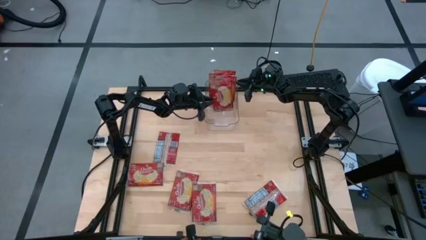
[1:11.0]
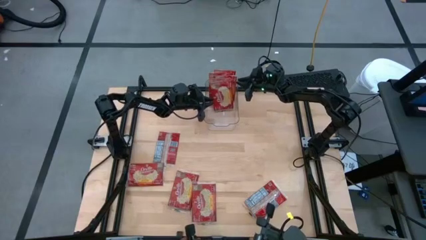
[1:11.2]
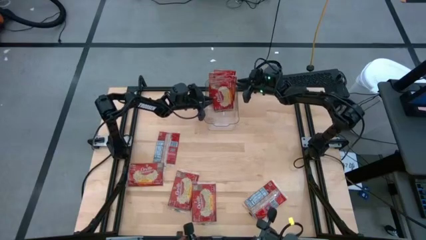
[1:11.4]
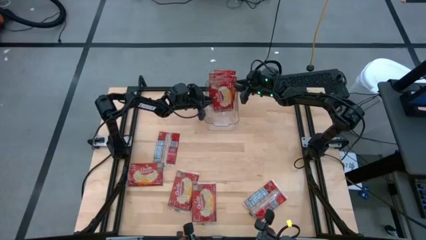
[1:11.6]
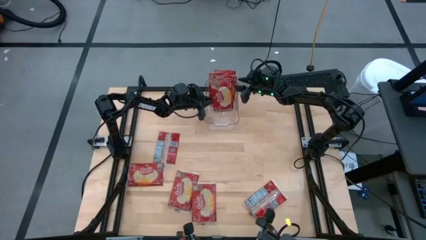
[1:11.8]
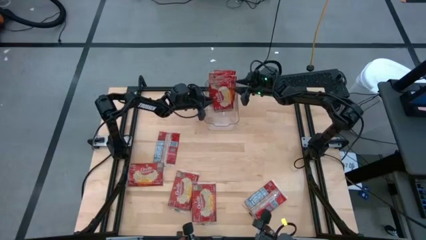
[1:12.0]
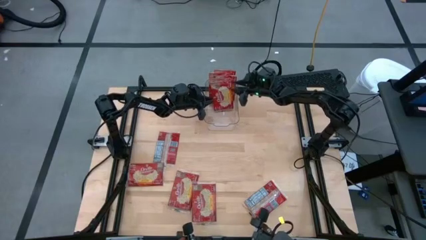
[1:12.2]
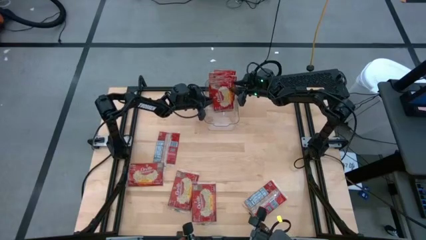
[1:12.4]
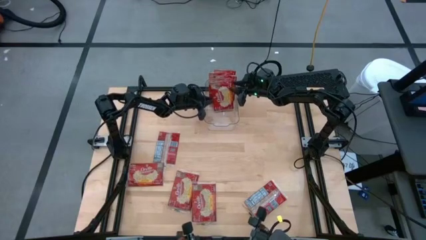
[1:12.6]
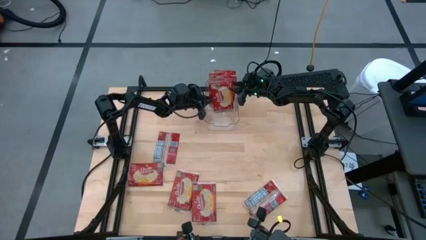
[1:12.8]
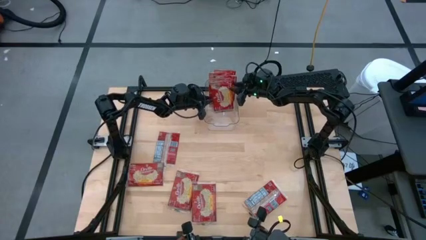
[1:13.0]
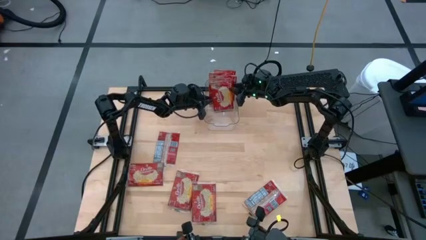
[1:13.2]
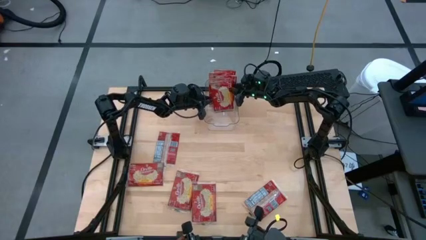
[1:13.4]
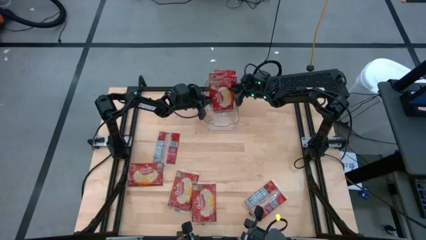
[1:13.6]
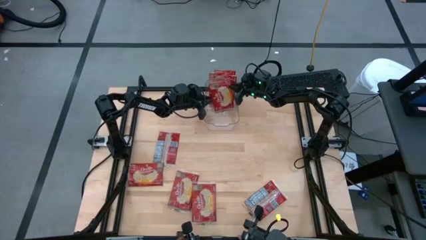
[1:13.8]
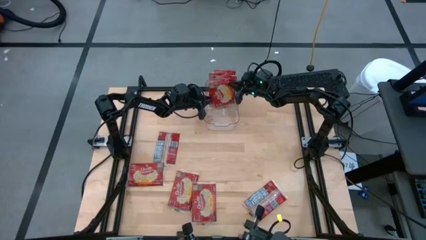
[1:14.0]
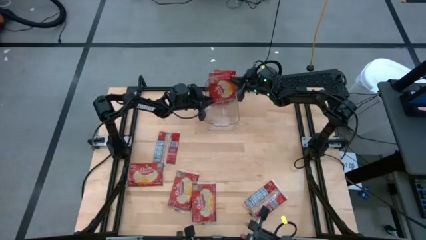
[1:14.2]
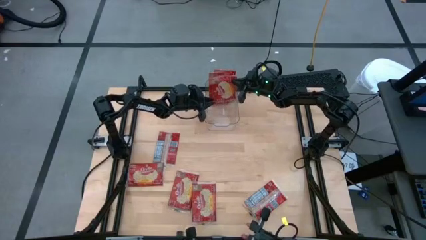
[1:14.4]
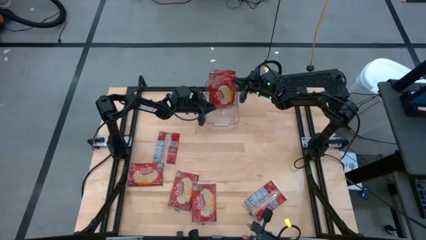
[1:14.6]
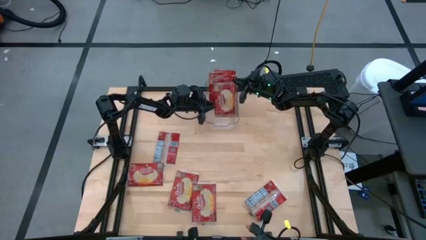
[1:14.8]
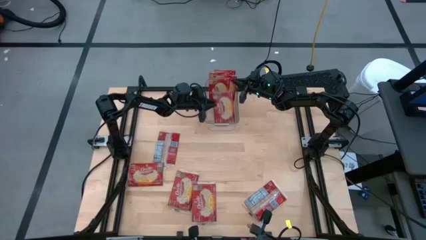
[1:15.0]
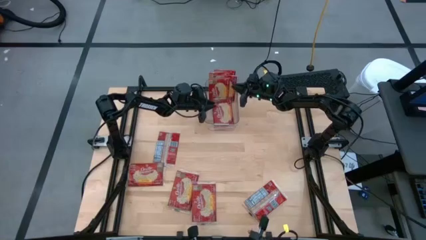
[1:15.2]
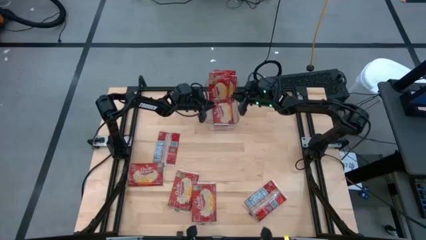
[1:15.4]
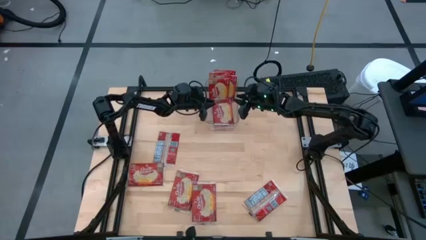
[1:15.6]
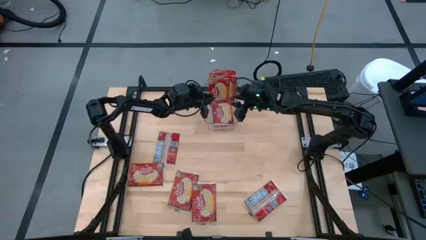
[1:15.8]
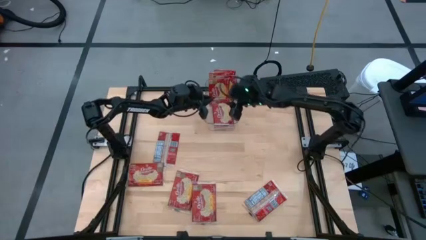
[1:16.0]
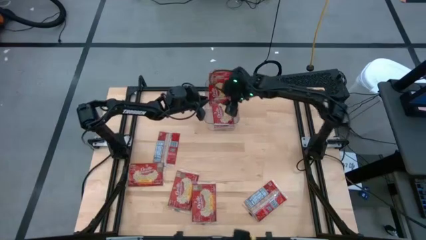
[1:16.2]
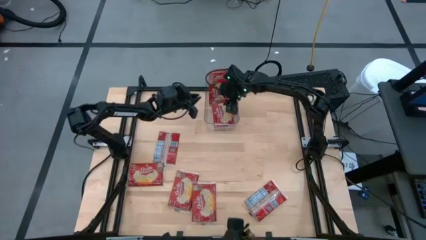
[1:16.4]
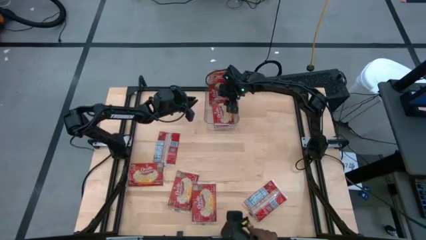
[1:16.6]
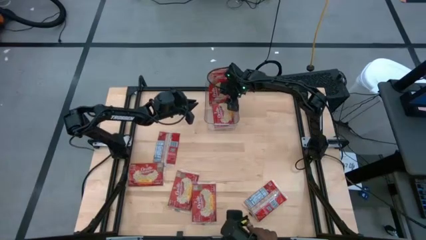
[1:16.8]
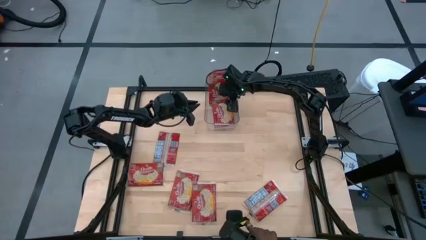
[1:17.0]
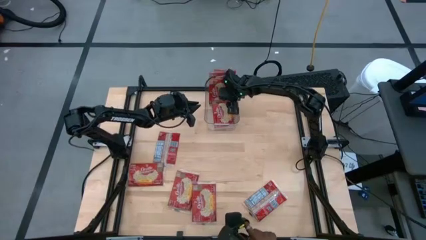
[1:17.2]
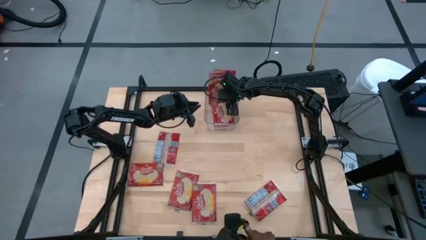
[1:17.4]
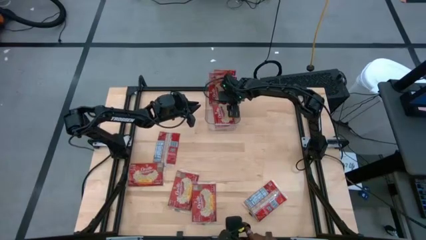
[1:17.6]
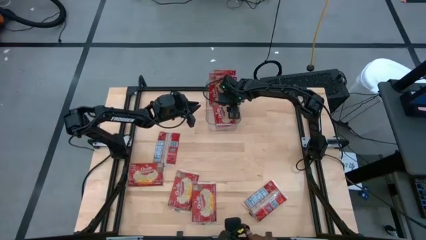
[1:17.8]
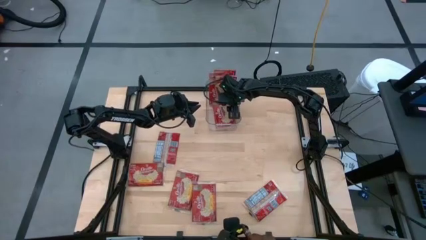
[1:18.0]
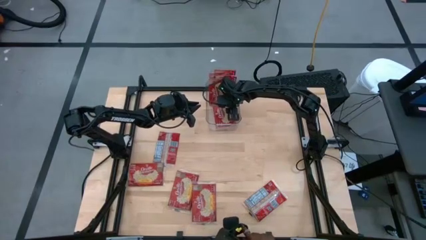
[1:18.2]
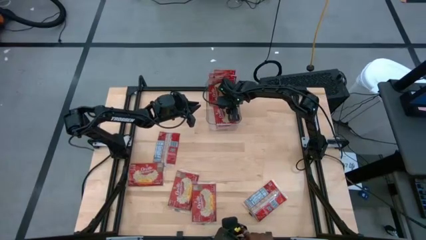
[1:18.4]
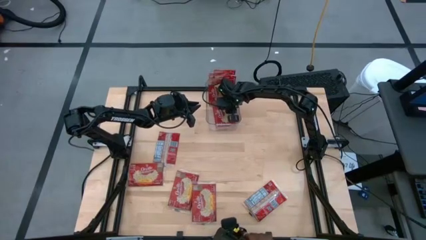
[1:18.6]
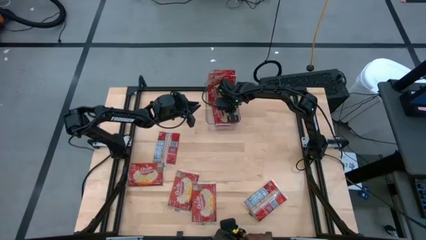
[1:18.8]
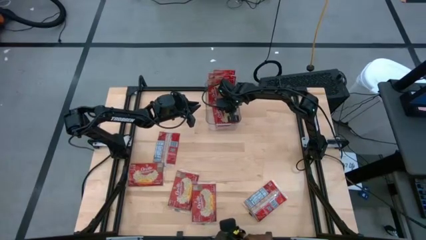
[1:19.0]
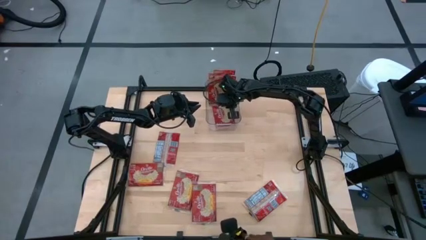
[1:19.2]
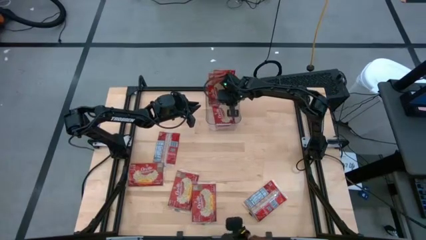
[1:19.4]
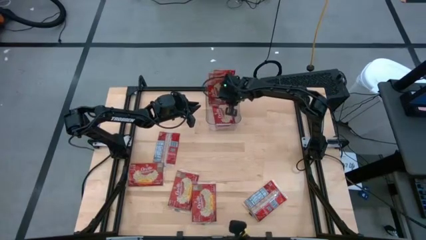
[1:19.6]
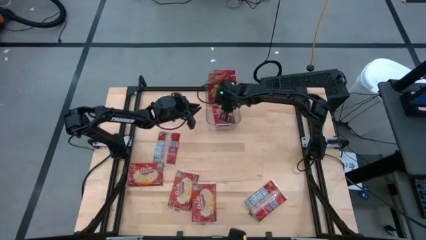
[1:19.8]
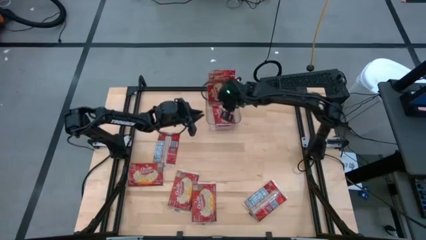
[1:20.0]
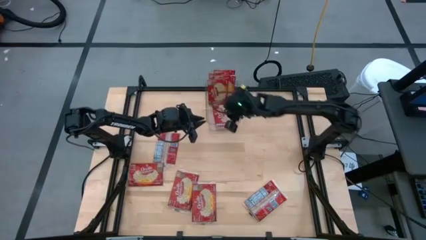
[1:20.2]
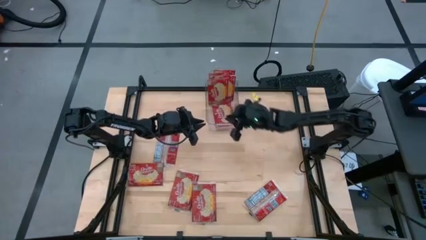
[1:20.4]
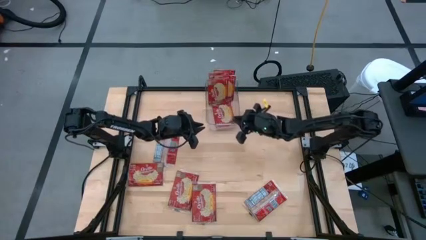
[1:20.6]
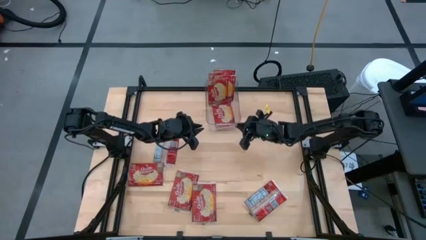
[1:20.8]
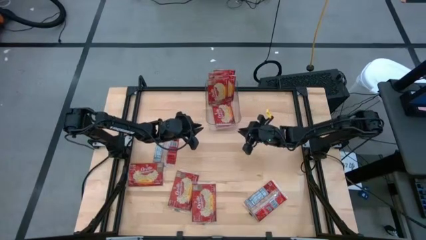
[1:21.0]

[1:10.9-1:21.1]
Task: Sort popcorn bags into baskets
Adjust the red popcorn pack in the transparent bin

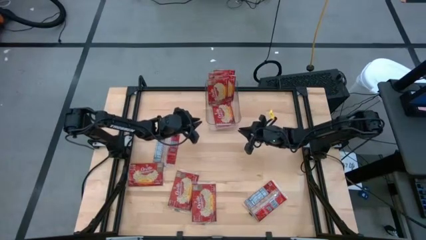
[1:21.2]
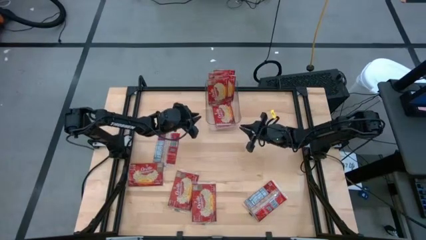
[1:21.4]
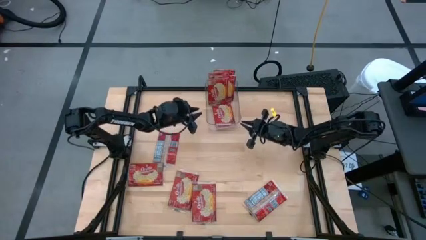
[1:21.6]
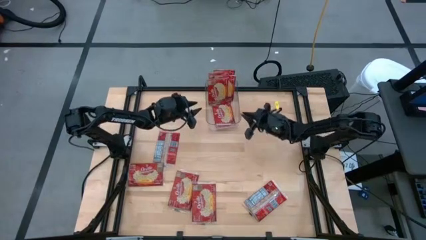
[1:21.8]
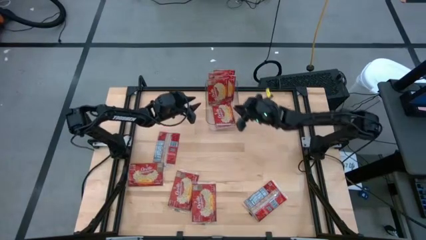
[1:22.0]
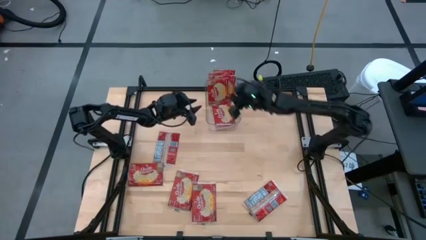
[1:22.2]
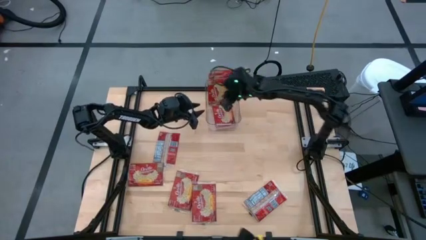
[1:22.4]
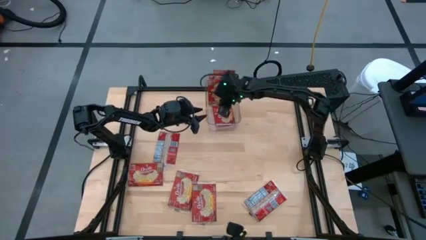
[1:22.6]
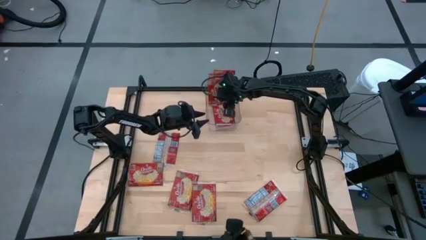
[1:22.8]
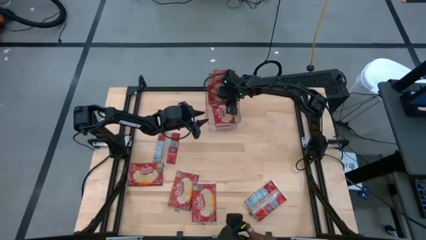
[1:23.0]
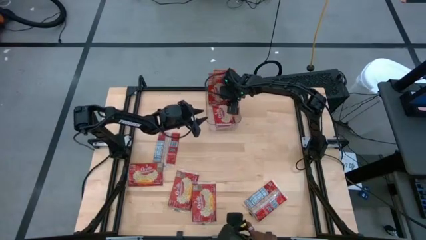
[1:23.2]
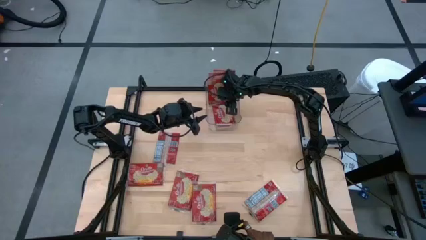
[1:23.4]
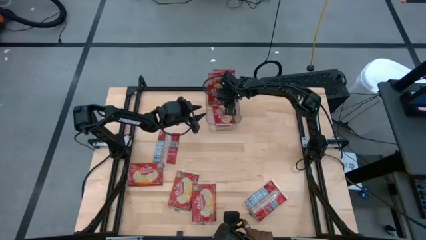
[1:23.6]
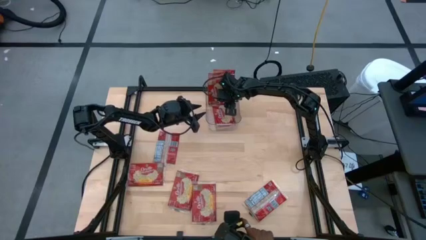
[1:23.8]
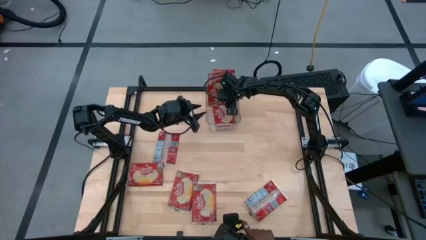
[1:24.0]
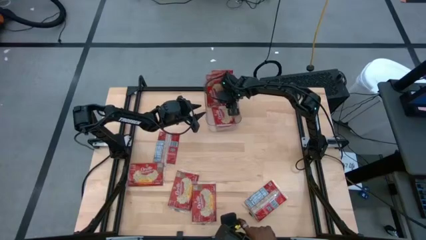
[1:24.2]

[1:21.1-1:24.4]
Adjust the red popcorn pack in the transparent bin
